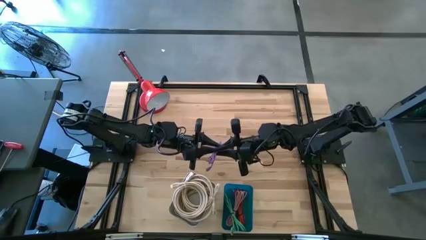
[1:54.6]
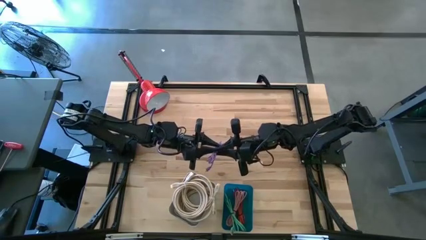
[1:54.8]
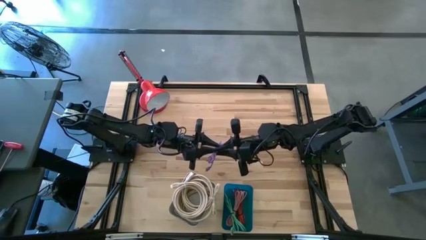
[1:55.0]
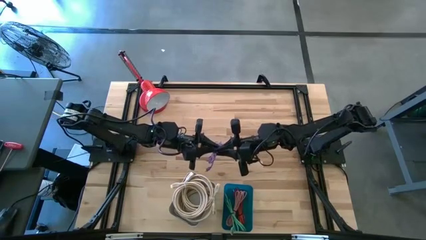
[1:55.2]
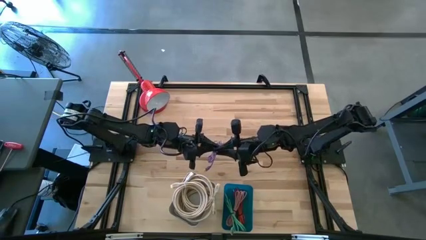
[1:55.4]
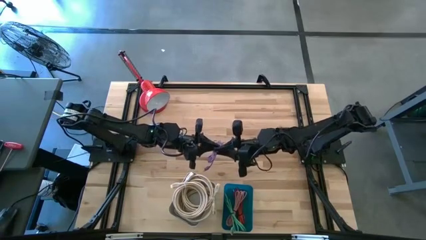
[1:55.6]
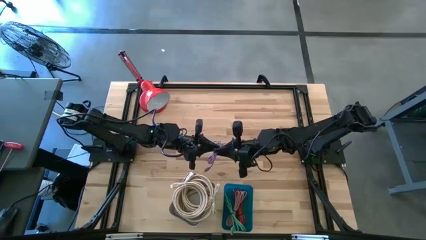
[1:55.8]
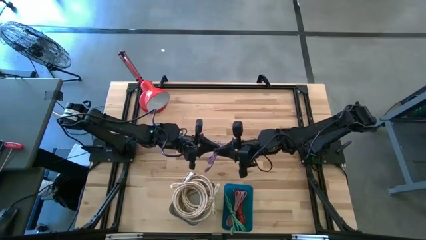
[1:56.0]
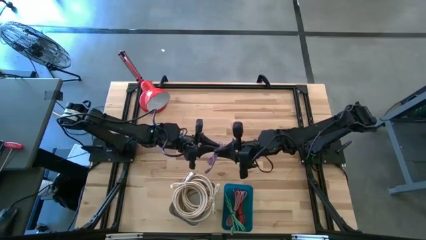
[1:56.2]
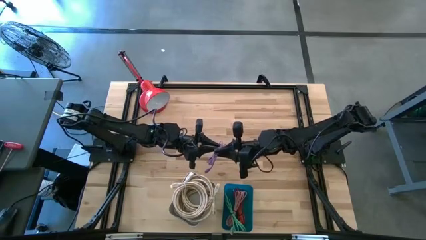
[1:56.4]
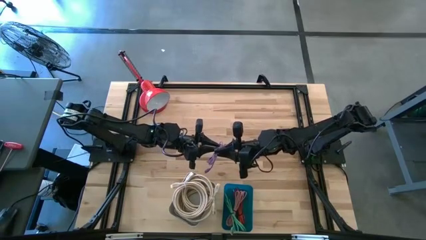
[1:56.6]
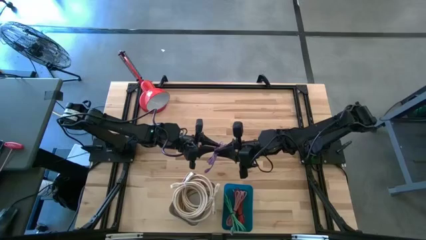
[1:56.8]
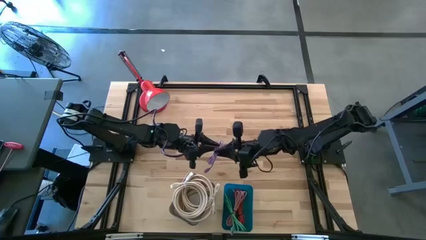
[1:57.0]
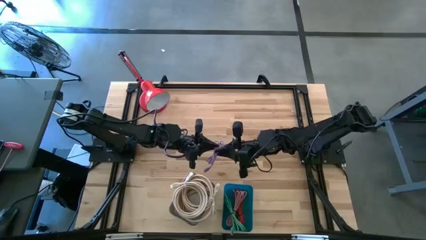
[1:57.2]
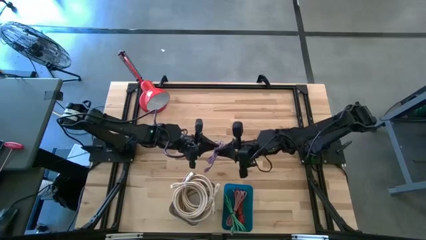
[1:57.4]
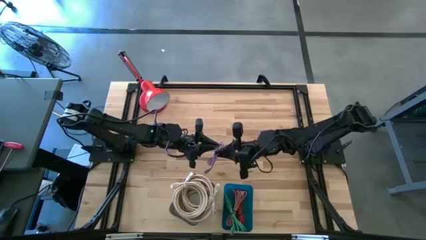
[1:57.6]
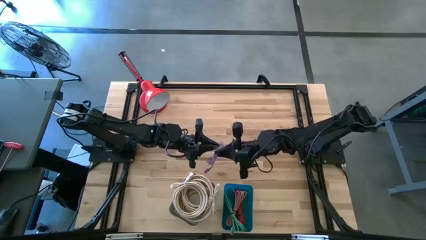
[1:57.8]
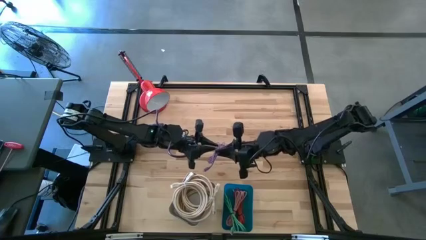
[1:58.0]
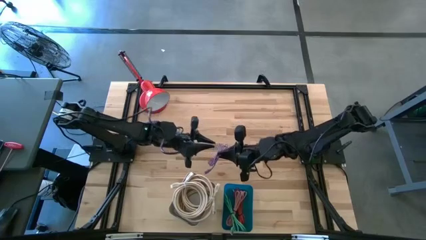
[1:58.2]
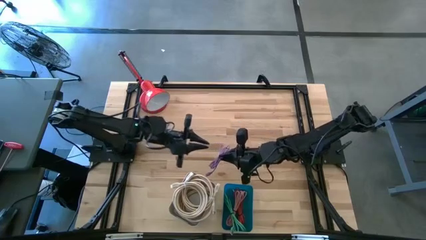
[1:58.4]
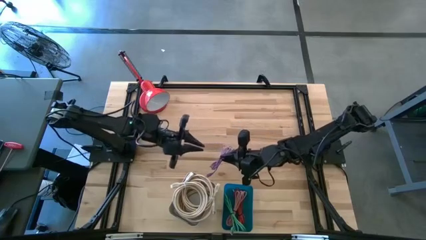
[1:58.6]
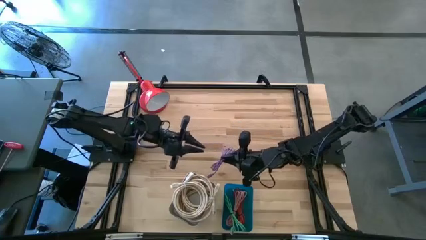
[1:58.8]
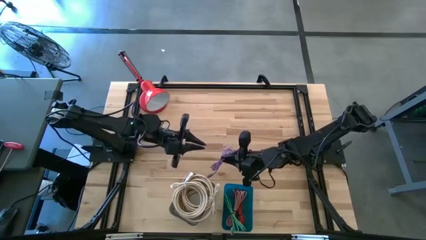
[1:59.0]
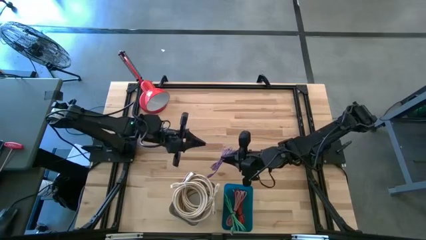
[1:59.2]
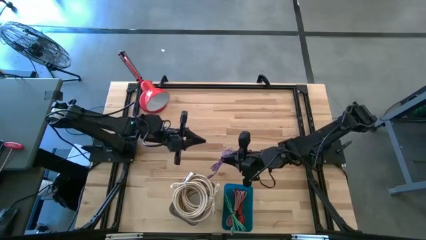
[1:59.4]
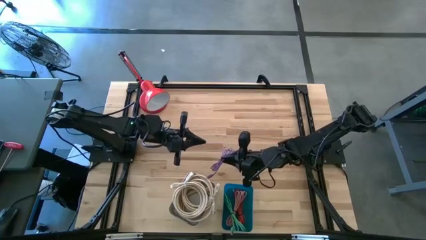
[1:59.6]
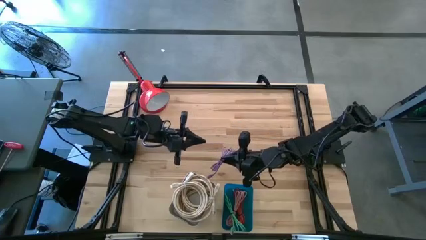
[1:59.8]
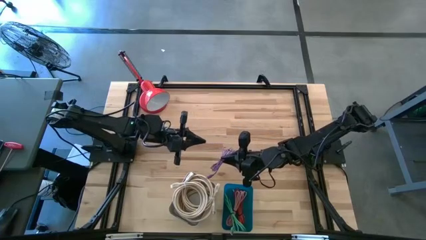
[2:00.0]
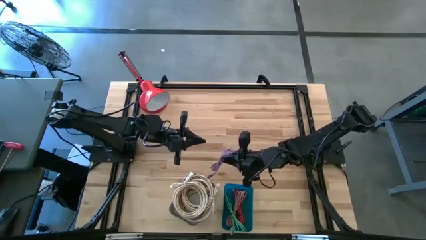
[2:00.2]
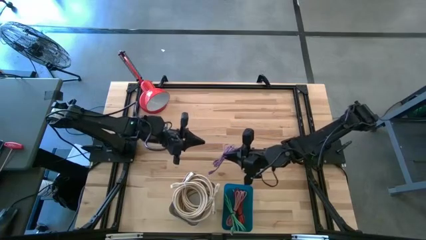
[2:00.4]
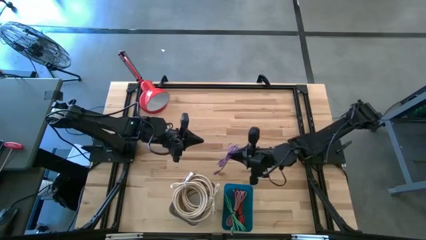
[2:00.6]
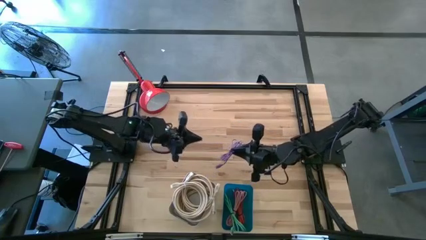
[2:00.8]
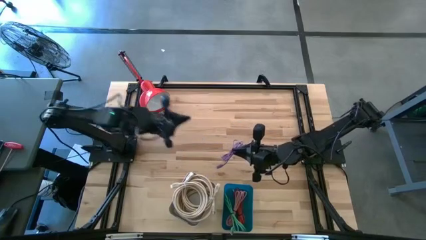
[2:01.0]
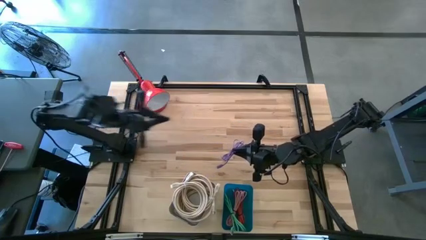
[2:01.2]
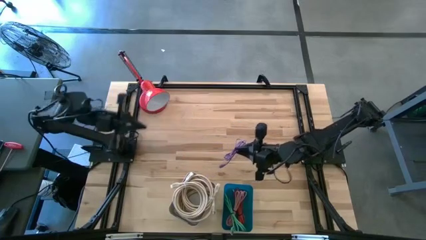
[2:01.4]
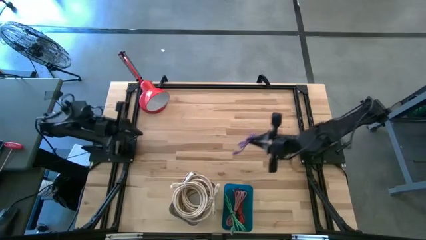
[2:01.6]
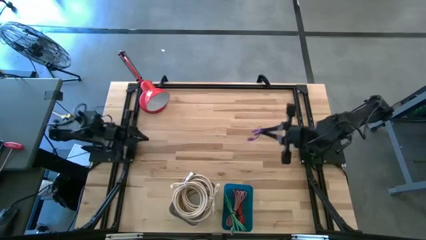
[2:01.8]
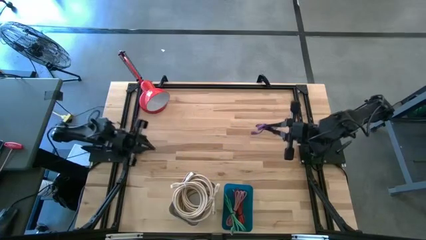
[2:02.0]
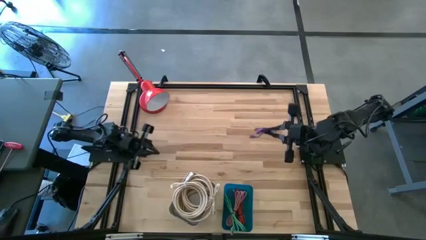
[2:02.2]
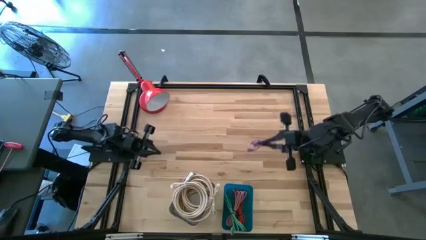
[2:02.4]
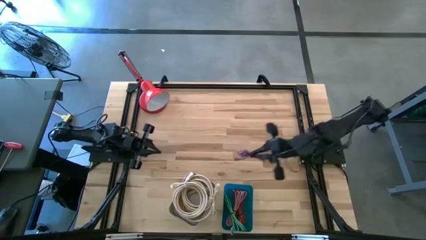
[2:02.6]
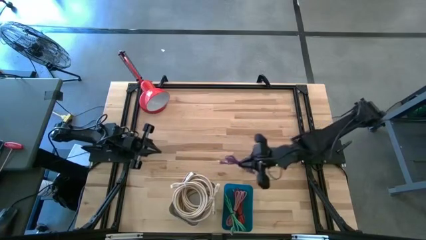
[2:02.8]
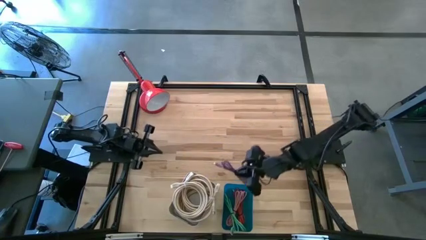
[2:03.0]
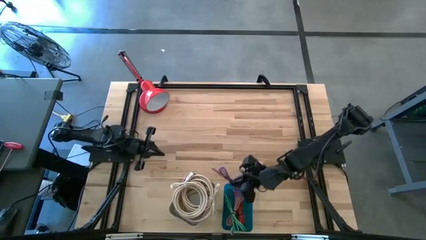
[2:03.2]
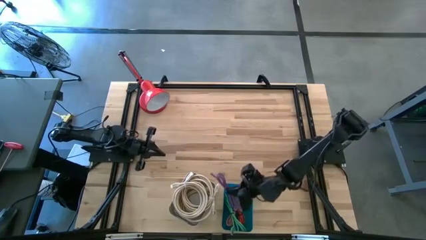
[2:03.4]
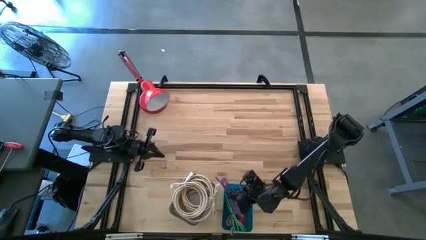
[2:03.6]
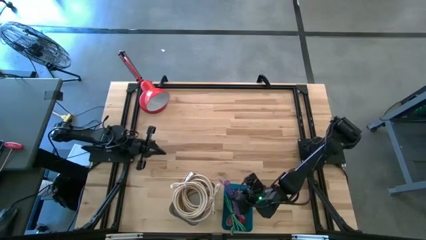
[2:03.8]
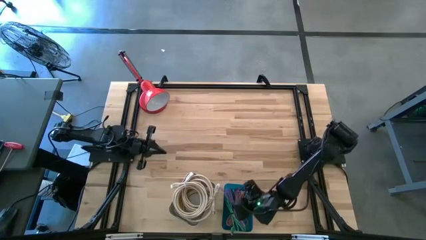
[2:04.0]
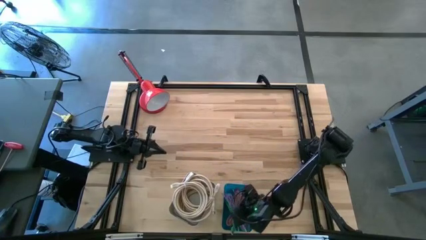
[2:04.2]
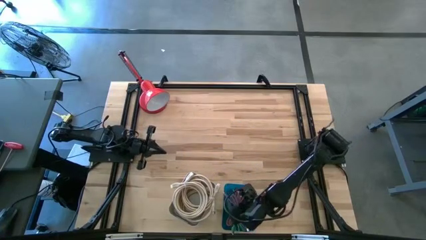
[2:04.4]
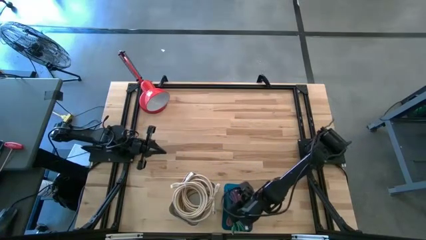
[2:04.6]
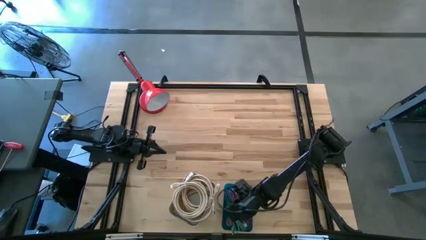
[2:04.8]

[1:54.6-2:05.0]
Task: Pick & Place USB Port
Put the violet USB cable into the blue bin

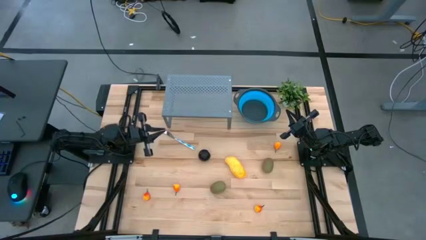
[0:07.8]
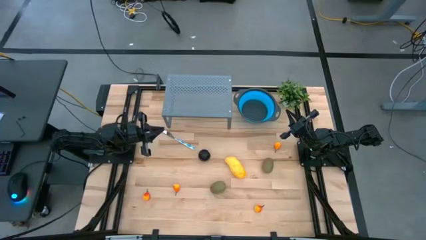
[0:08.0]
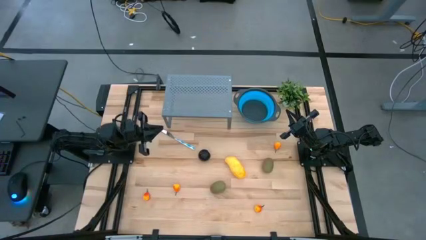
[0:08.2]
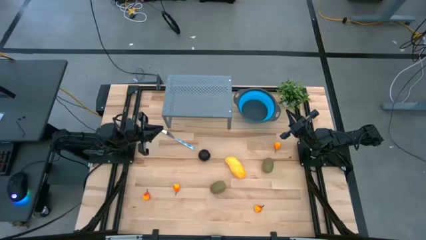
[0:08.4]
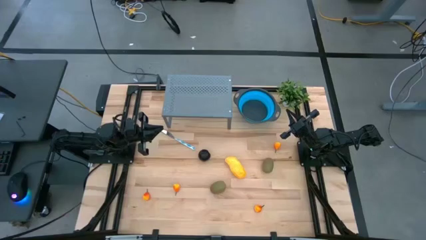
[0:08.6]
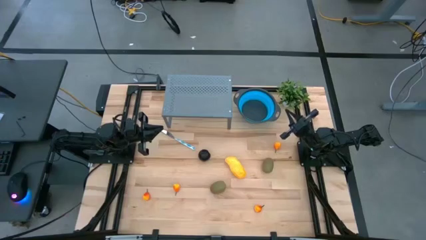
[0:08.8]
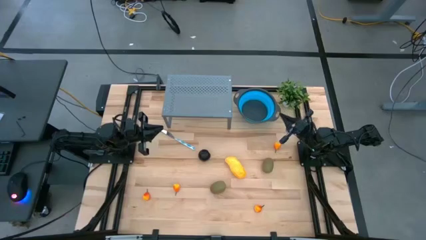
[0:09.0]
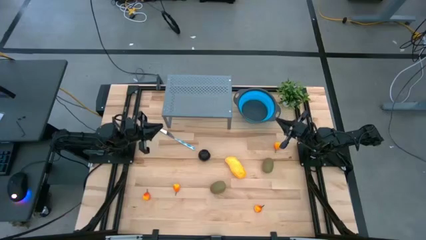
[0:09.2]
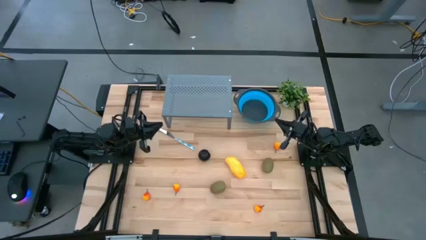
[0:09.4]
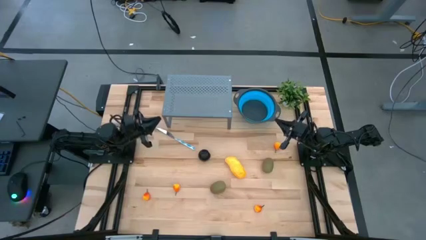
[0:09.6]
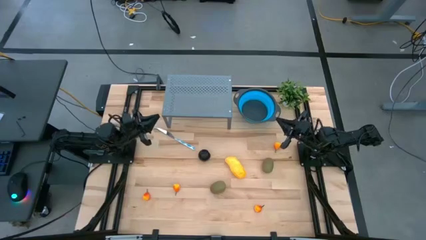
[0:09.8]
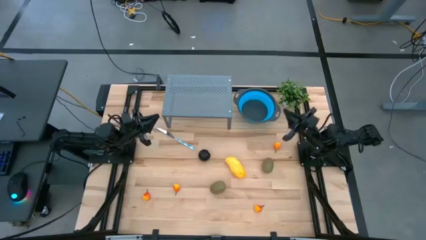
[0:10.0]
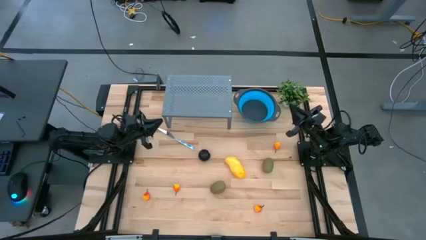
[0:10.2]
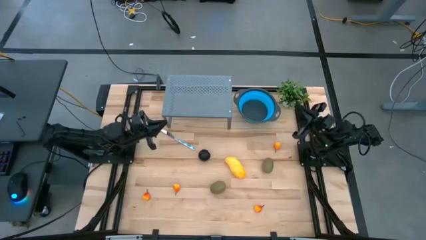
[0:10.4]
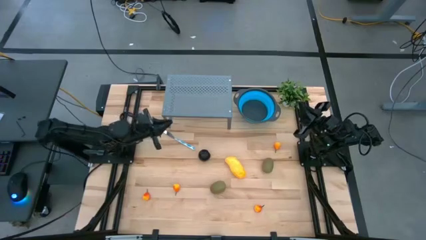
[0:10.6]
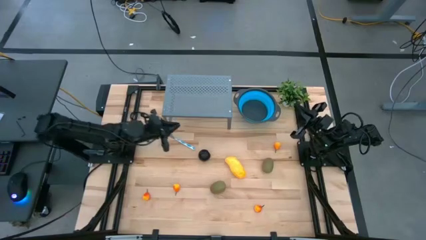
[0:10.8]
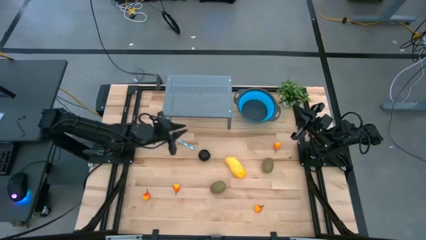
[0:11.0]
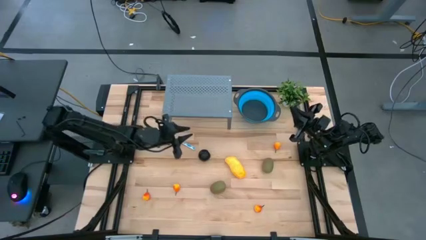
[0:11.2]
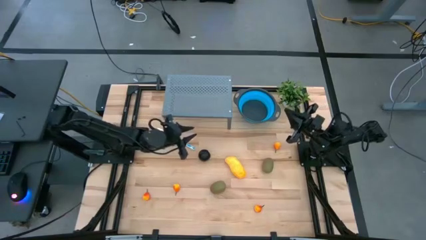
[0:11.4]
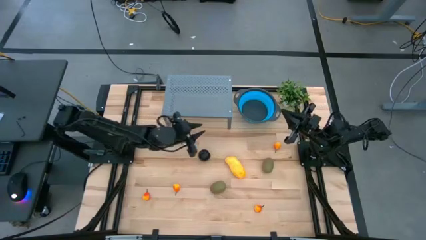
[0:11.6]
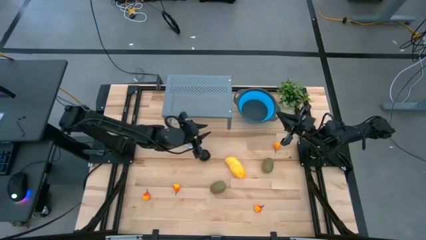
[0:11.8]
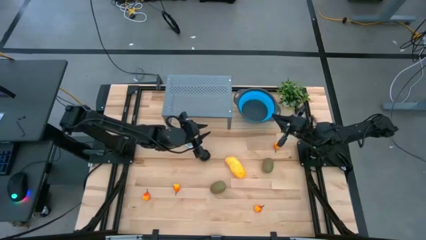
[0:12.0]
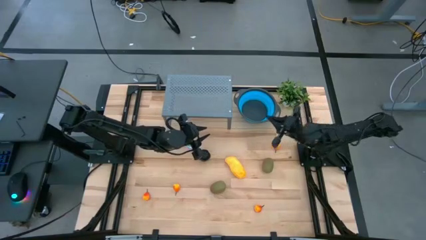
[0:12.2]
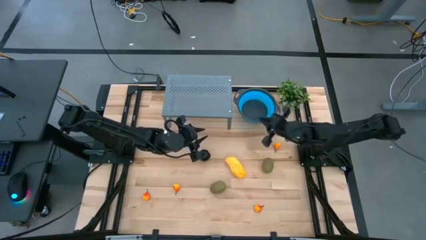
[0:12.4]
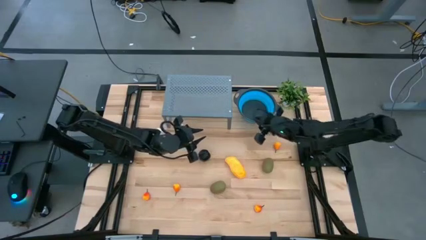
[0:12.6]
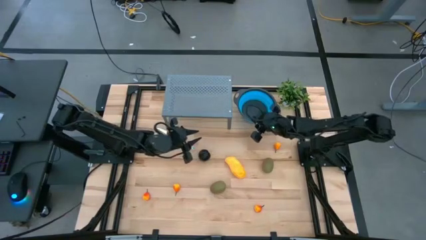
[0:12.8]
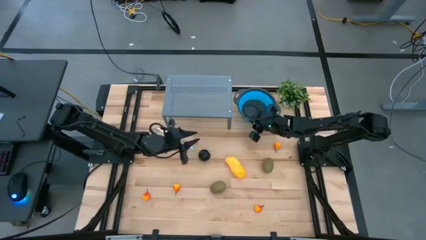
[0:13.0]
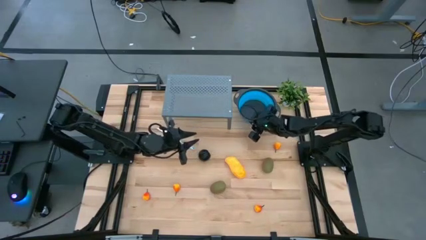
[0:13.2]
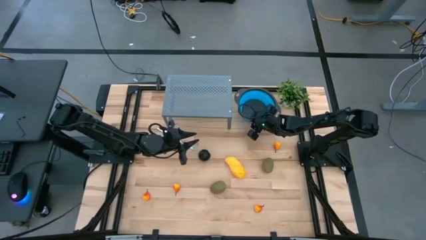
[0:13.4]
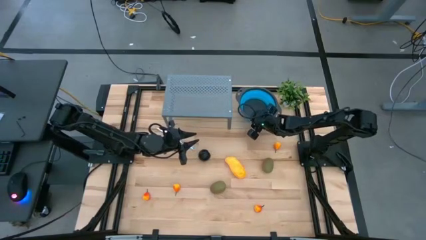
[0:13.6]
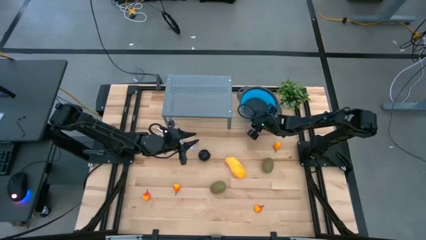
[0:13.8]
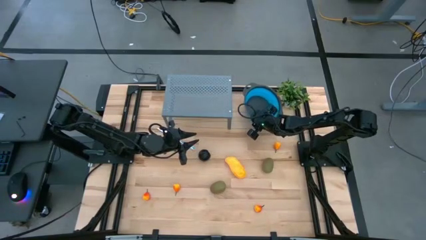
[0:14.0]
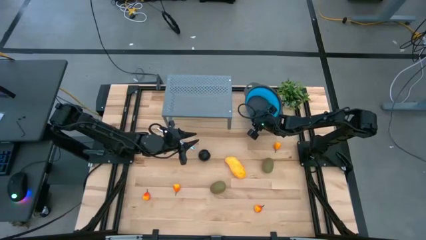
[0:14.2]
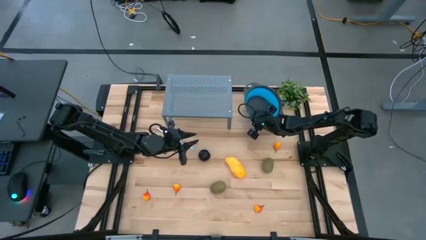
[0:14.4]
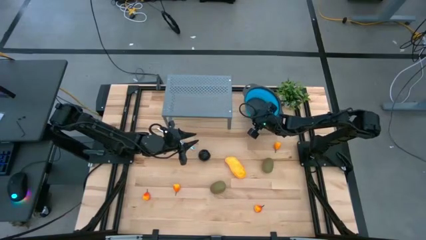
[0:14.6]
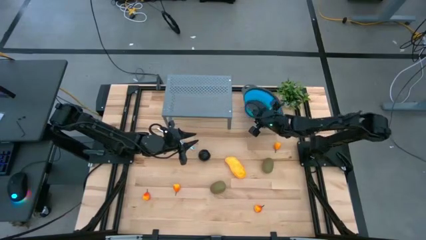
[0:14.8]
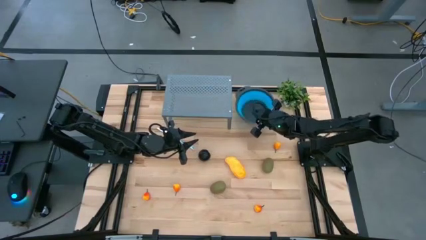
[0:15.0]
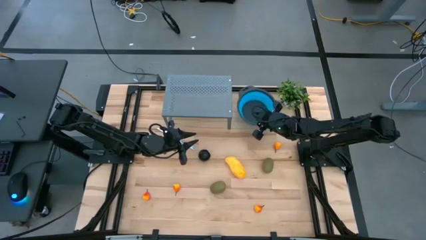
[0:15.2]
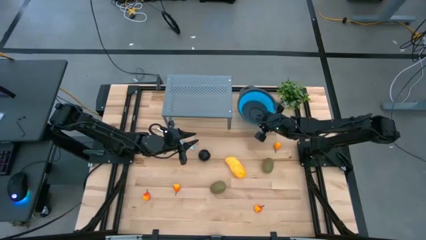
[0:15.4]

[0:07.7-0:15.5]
Task: Pick & Place Fruit
Put the blue strainer bowl on top of the gray metal shelf
